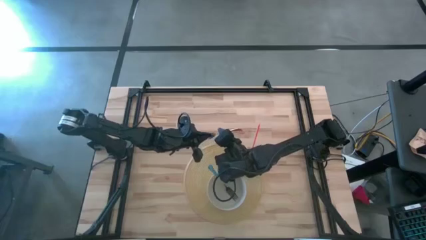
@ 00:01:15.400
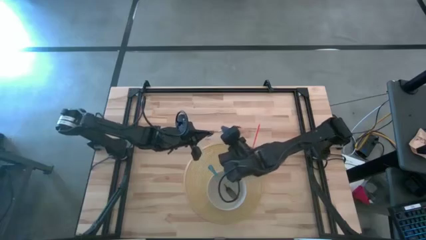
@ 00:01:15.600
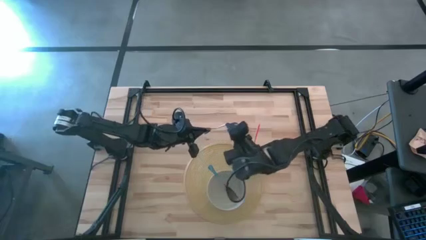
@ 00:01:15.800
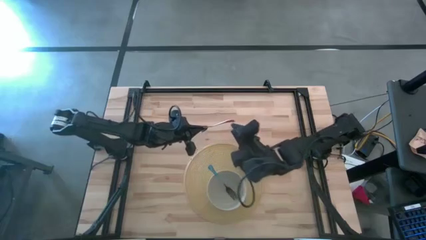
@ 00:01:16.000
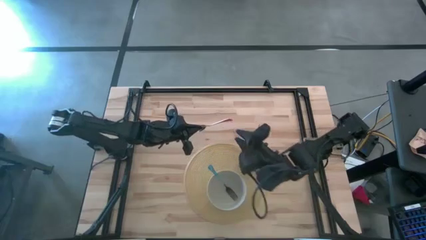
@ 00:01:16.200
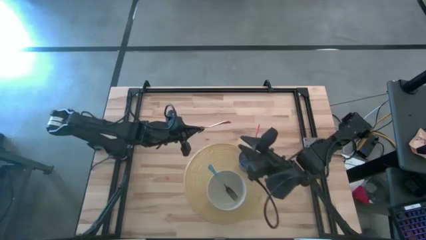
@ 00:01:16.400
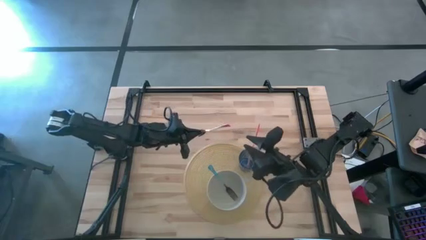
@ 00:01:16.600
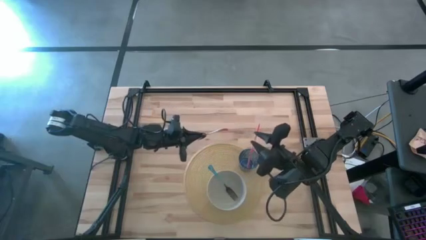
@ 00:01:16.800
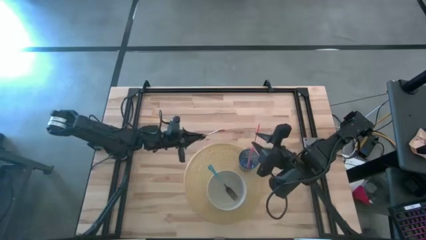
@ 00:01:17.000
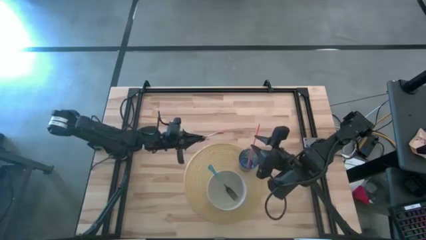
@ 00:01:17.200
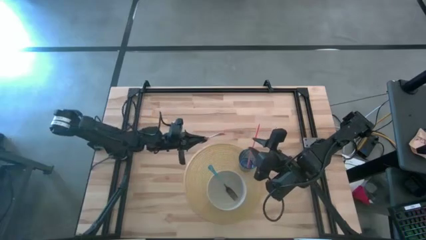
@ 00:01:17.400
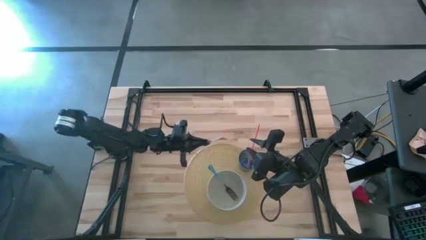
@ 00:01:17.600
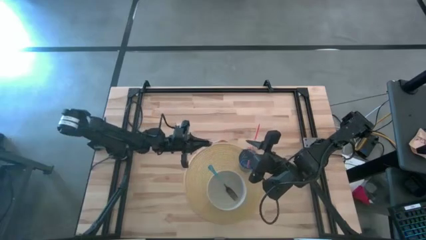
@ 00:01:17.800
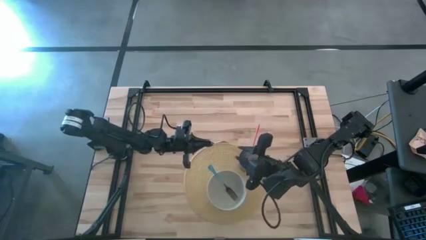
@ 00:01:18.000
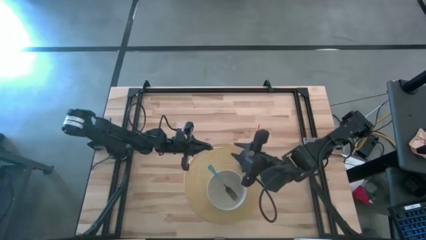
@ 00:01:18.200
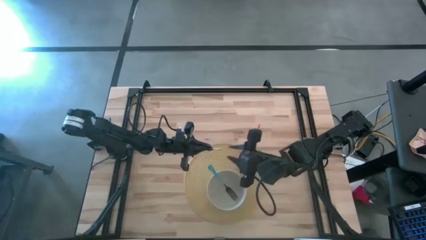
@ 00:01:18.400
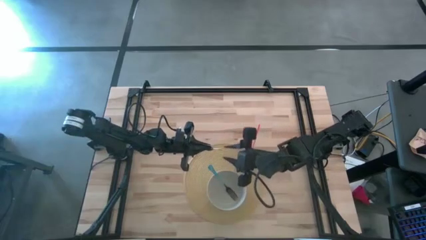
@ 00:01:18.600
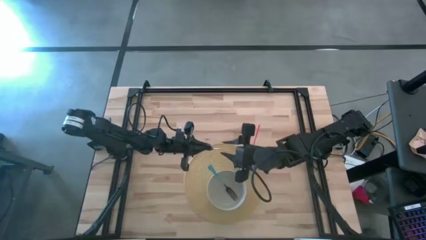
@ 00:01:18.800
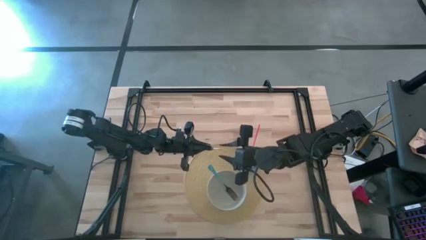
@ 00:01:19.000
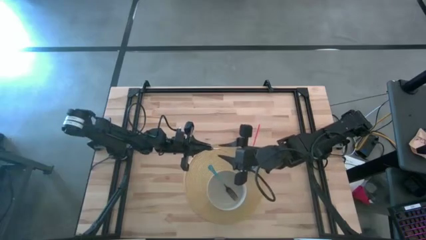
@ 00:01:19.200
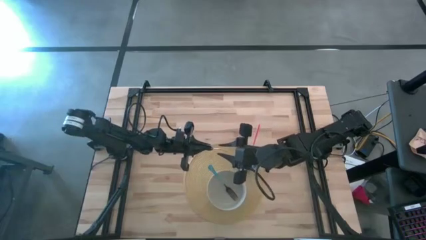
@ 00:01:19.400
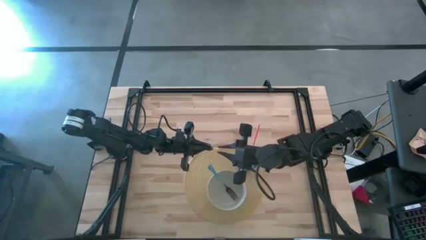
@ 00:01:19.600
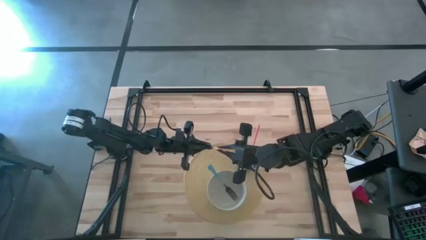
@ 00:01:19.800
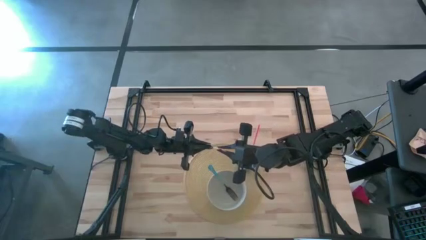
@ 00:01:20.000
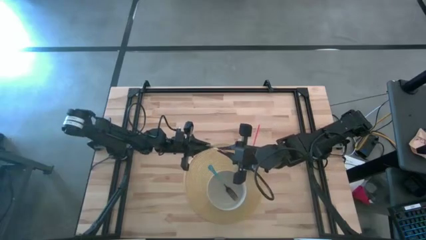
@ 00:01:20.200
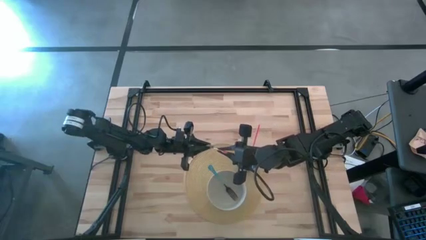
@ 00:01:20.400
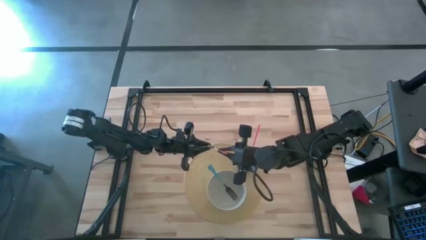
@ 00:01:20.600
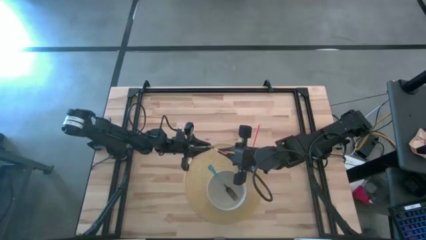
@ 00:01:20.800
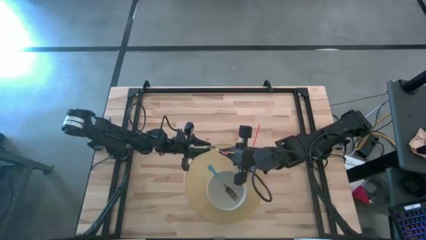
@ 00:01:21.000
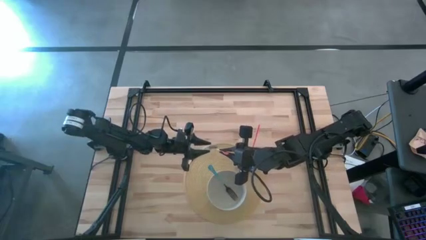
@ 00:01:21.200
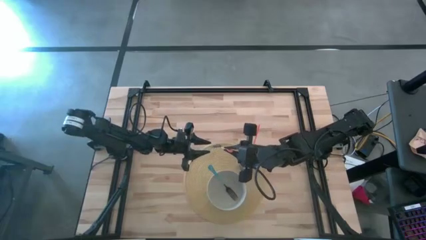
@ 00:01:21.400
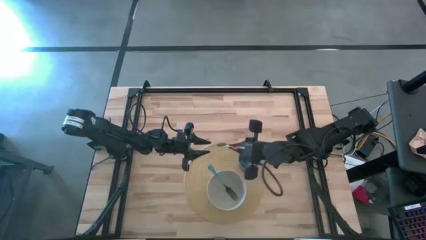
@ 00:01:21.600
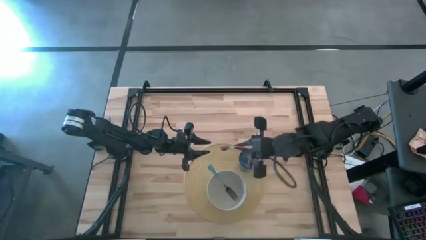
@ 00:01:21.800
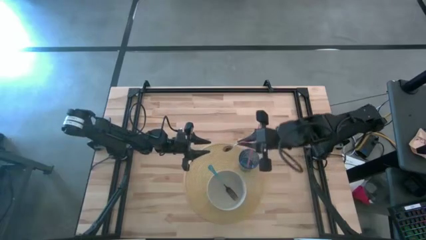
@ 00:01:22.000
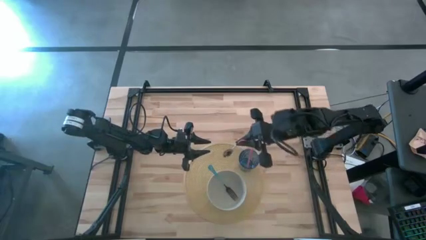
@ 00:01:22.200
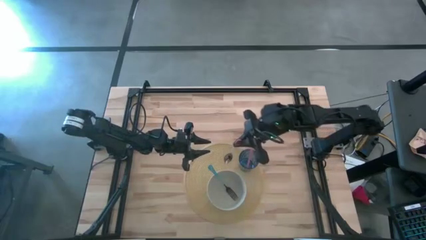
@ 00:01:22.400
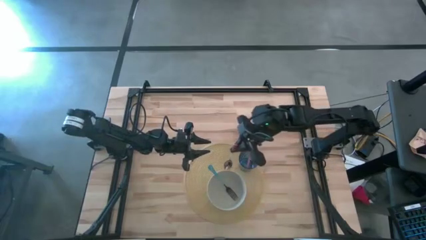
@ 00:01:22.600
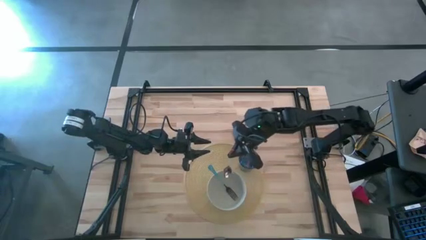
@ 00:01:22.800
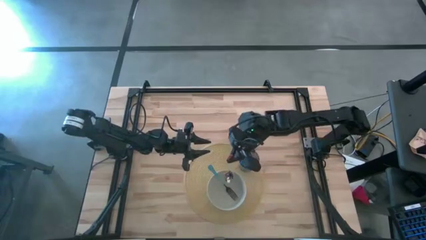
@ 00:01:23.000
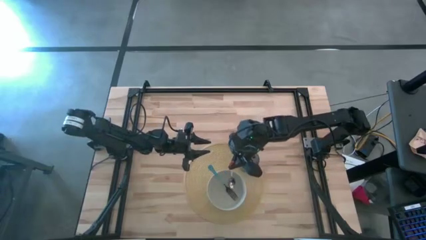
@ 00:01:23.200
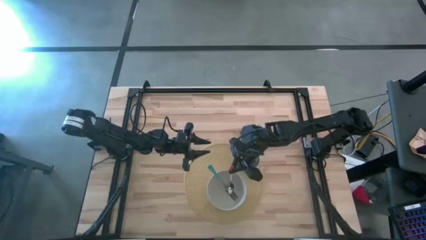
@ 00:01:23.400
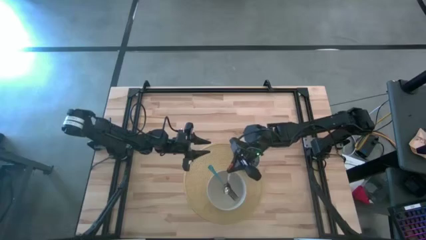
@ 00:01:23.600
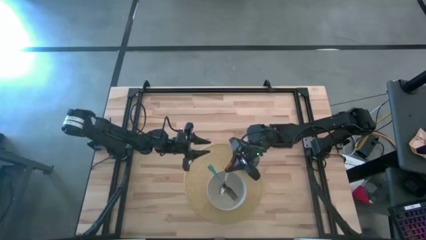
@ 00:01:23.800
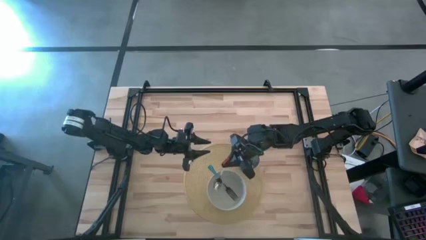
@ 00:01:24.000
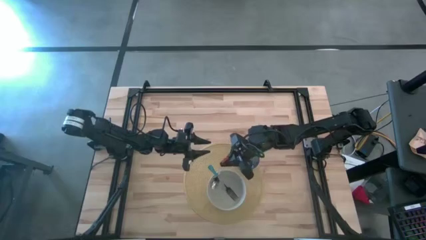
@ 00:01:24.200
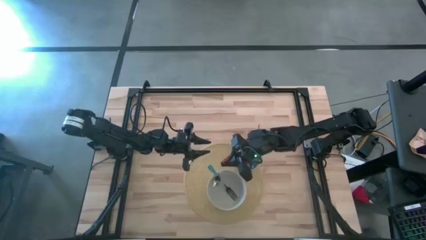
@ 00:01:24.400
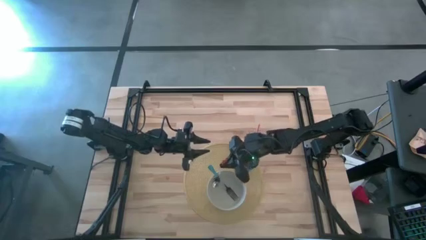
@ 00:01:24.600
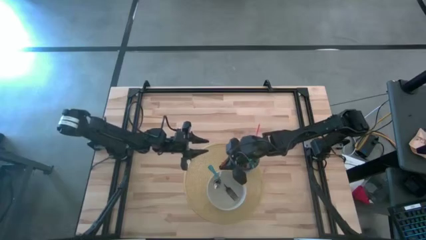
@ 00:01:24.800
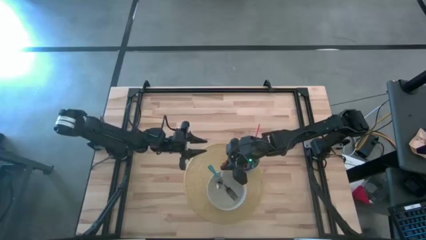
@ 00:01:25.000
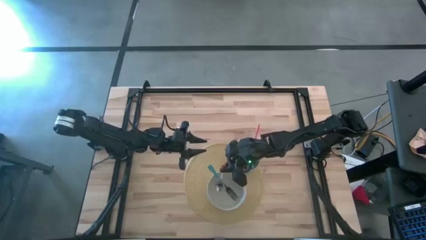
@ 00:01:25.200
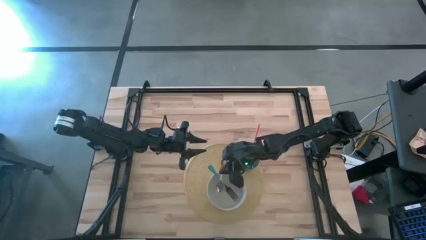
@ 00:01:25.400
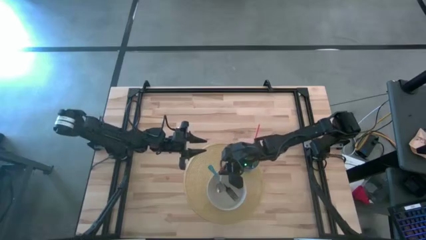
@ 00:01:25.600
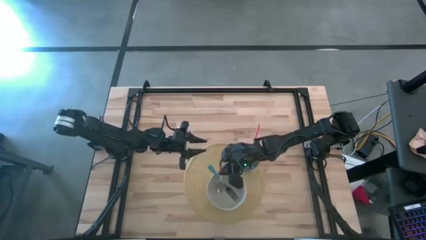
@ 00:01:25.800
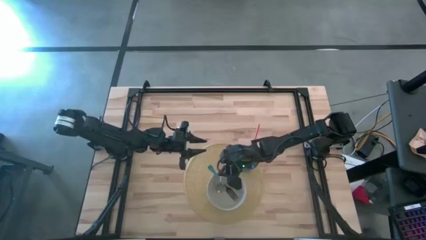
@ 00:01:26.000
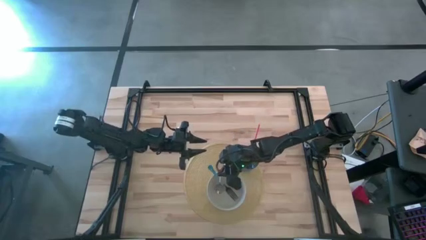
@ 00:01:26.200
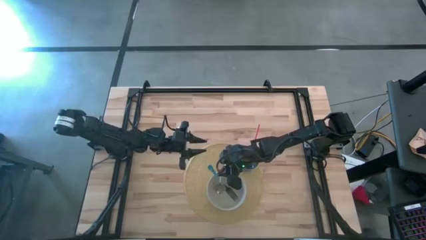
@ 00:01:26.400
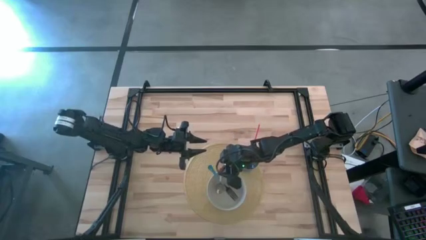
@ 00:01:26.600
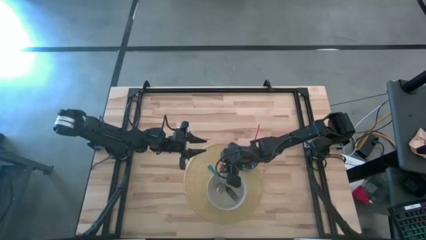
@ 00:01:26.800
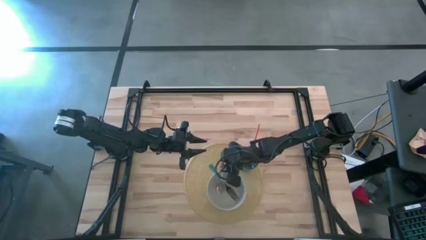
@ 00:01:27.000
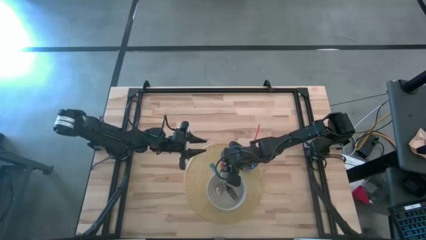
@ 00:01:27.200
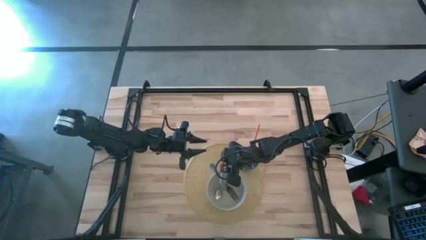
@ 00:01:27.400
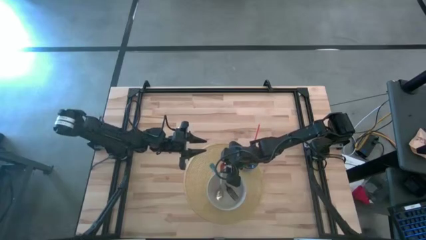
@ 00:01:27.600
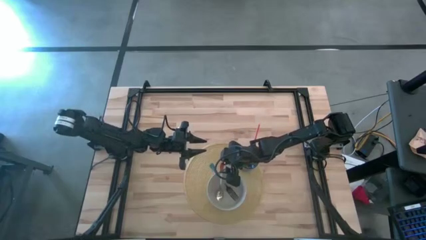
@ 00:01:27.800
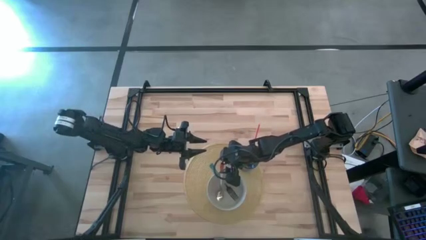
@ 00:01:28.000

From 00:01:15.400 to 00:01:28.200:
Task: Pick & Place Utensil
Put the orange spoon into the white bowl on the brown mat
